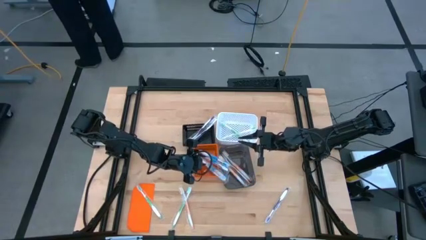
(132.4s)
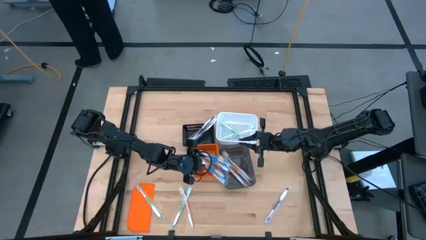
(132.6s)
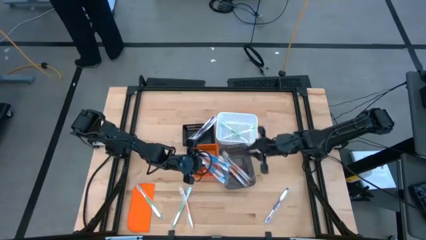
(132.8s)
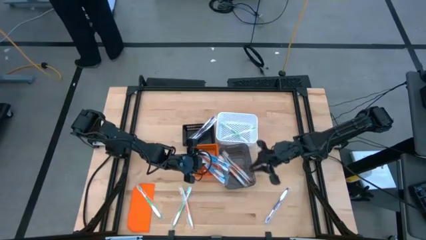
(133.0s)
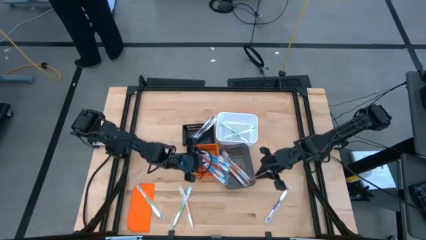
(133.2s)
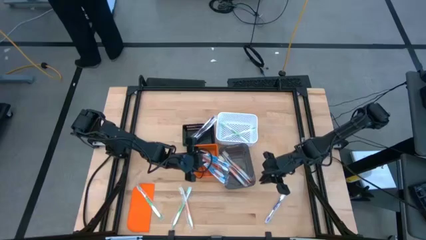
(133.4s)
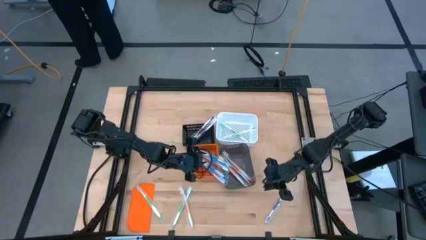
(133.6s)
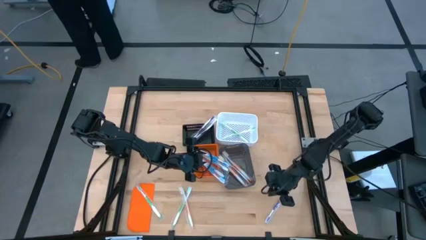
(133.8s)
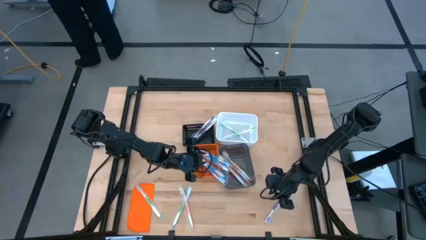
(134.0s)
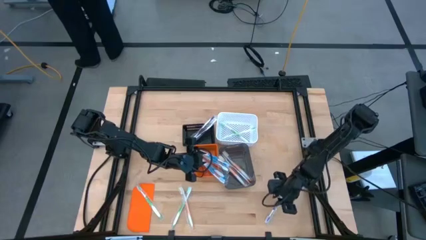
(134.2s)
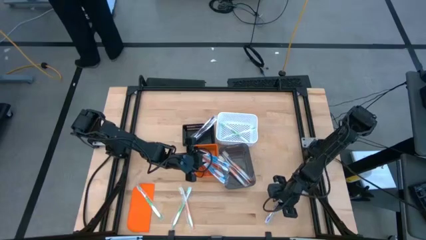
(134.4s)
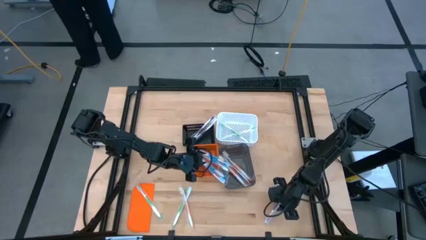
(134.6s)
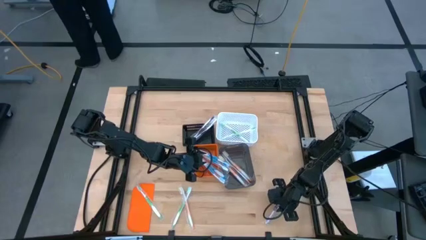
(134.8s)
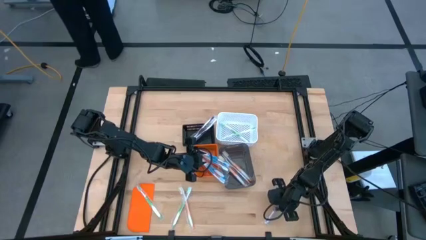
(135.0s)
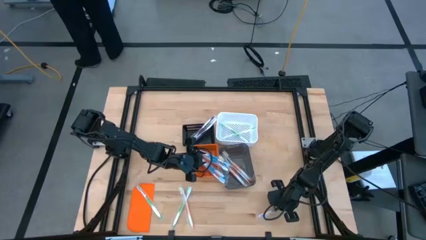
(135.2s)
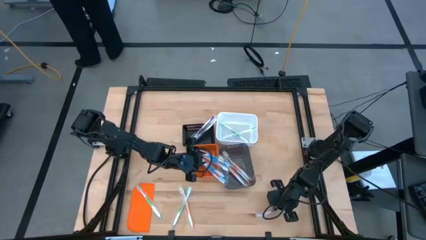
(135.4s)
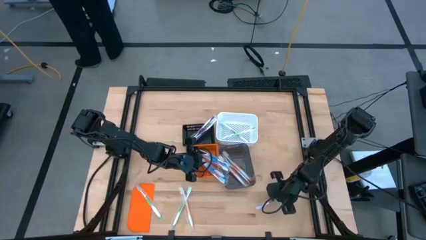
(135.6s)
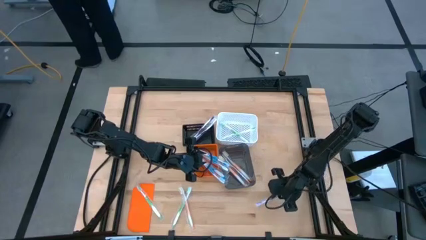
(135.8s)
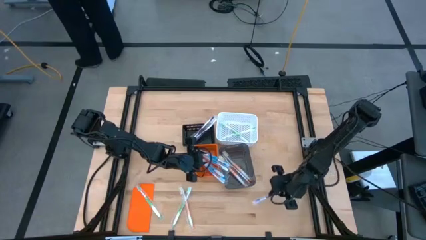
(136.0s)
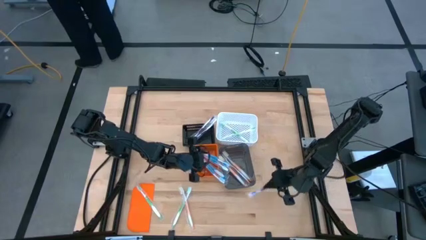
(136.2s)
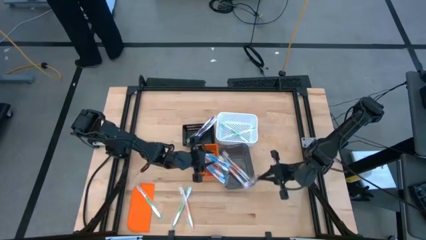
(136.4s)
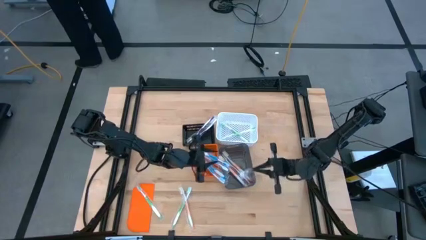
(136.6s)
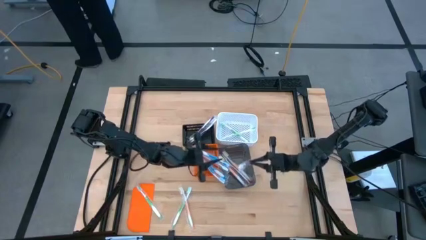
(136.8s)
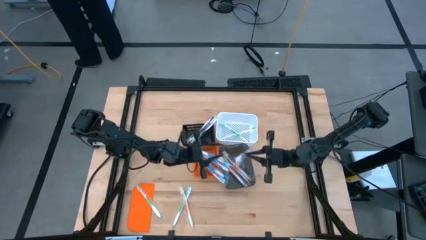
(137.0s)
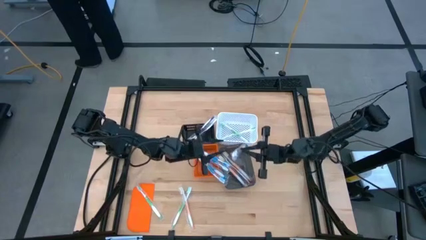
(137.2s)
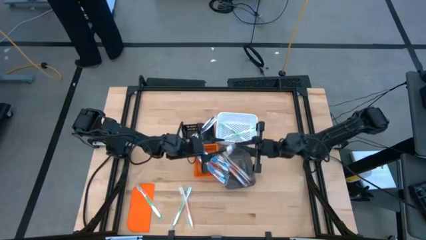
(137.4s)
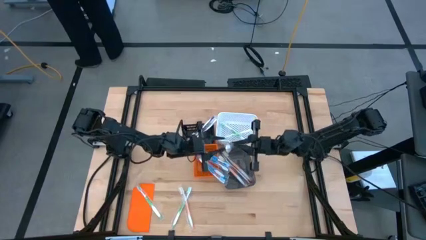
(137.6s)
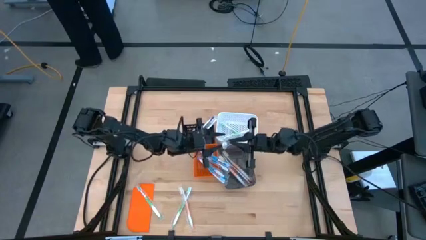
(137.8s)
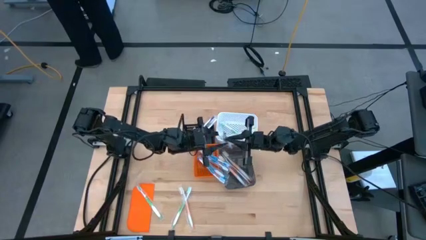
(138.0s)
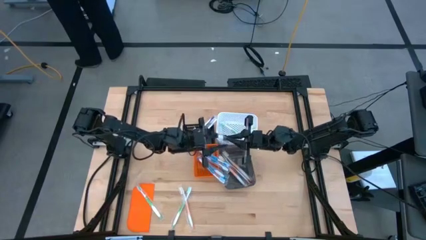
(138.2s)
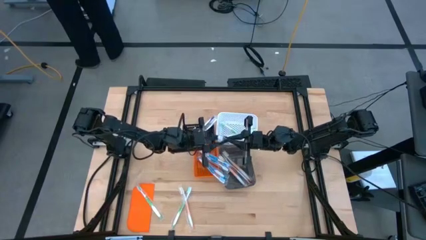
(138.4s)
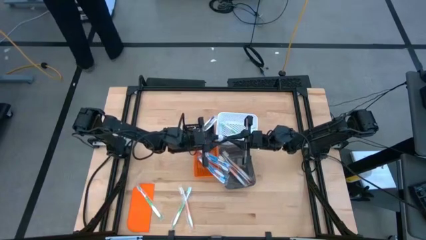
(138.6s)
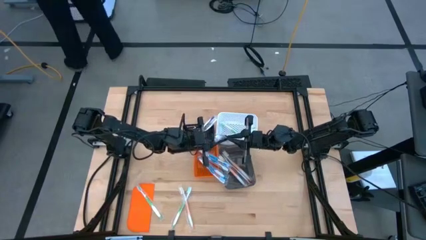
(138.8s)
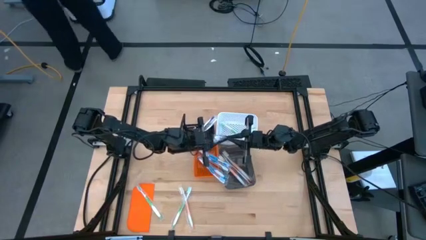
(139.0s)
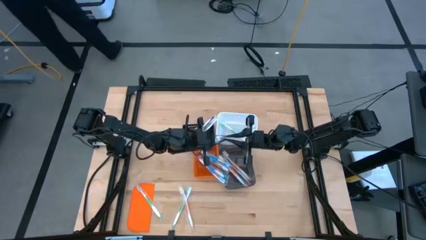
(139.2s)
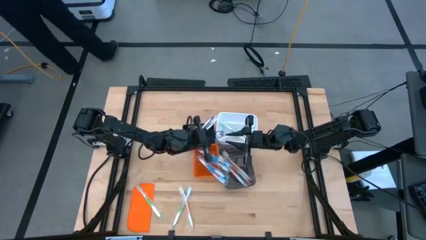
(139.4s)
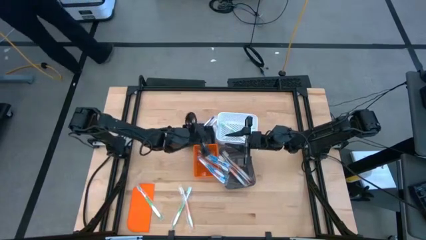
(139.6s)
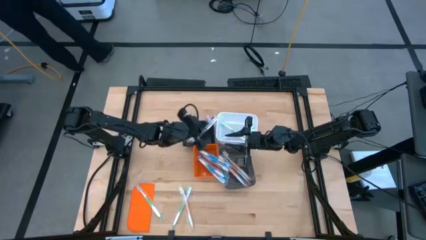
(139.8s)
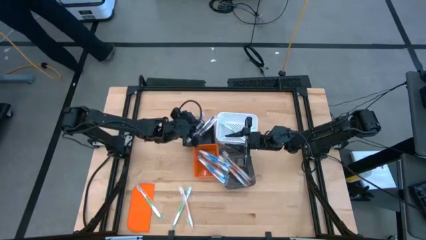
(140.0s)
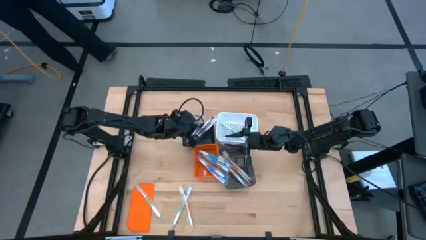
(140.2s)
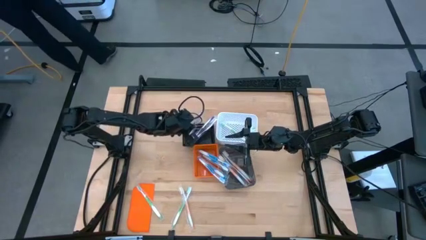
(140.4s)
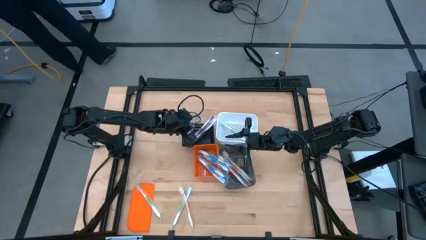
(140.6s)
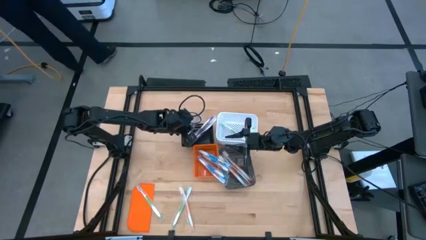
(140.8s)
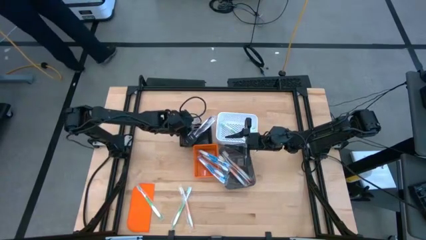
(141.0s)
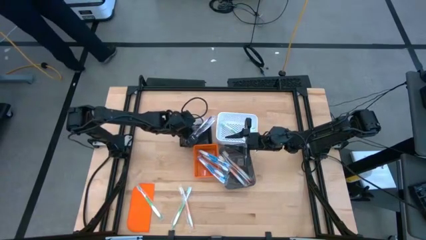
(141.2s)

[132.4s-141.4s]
Task: Pick & Place Toothbrushes
Put the violet toothbrush into the black bin

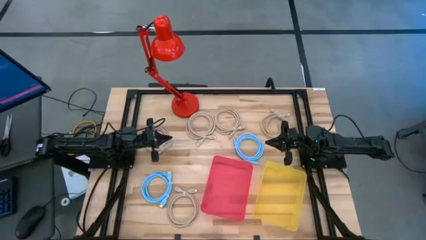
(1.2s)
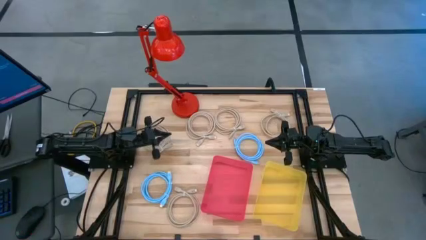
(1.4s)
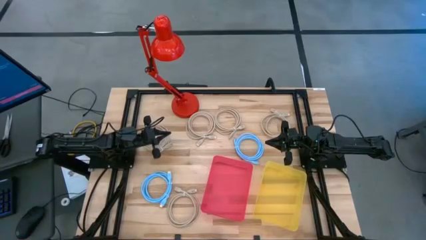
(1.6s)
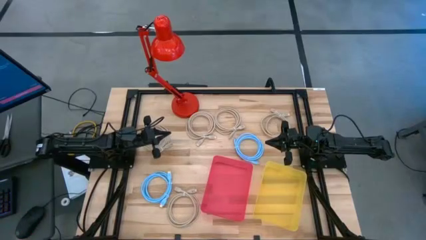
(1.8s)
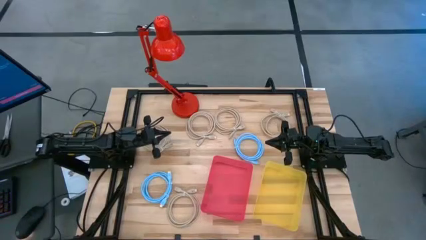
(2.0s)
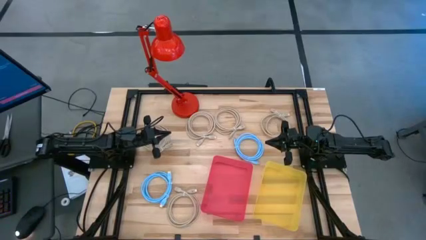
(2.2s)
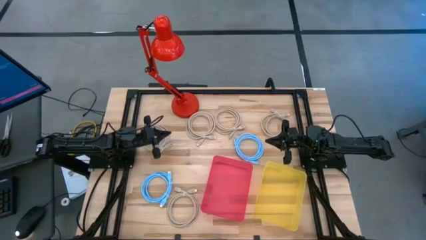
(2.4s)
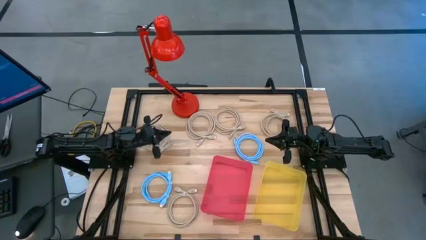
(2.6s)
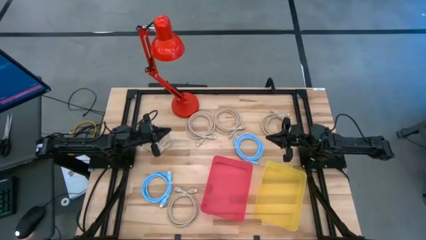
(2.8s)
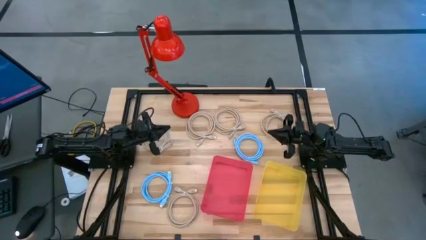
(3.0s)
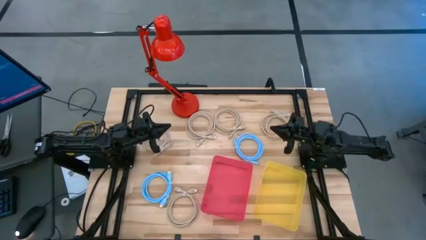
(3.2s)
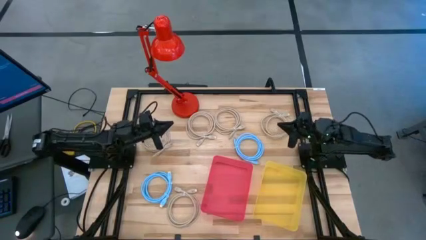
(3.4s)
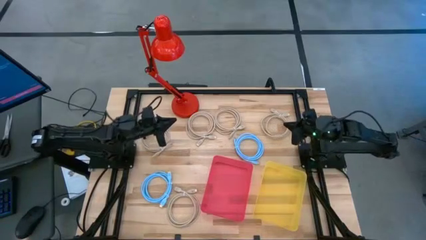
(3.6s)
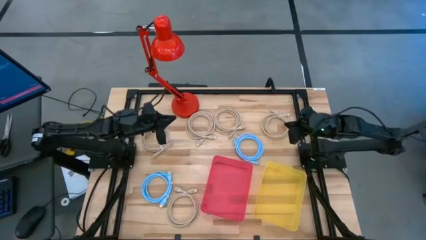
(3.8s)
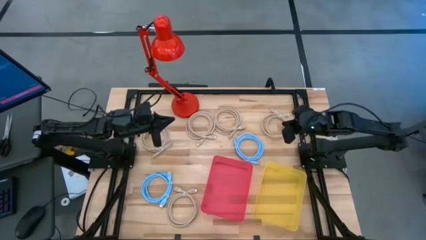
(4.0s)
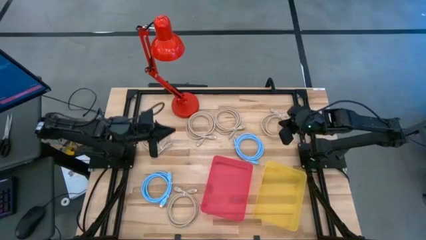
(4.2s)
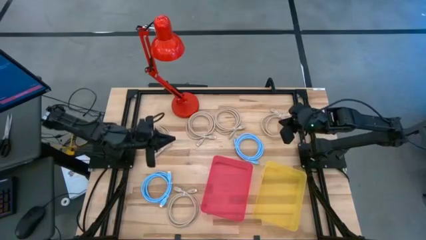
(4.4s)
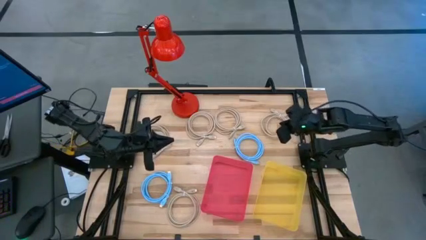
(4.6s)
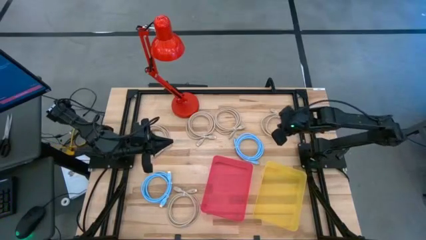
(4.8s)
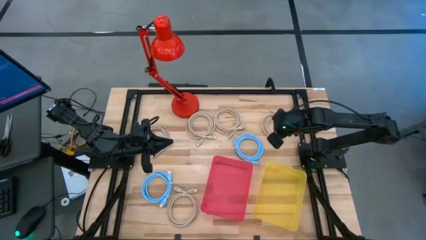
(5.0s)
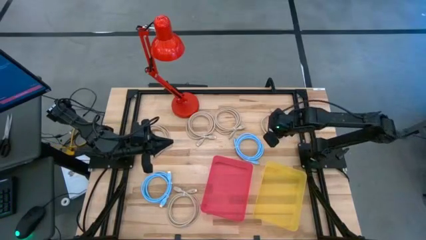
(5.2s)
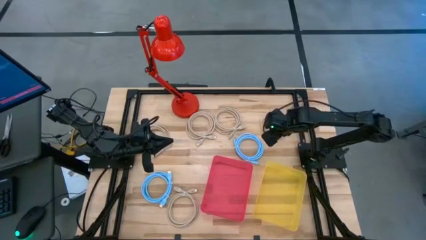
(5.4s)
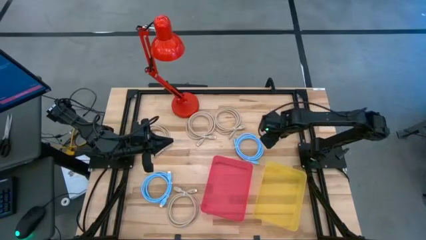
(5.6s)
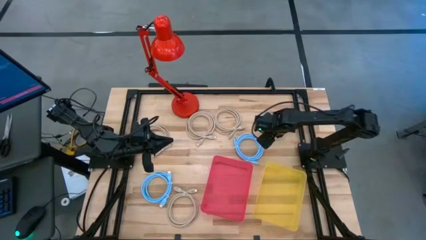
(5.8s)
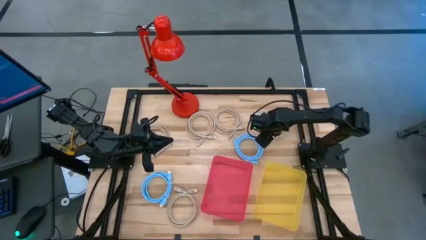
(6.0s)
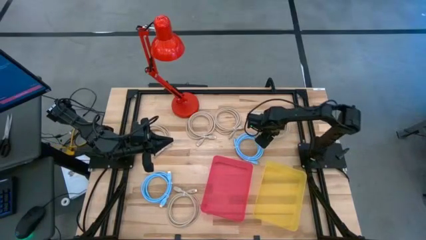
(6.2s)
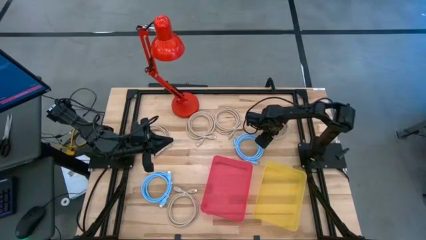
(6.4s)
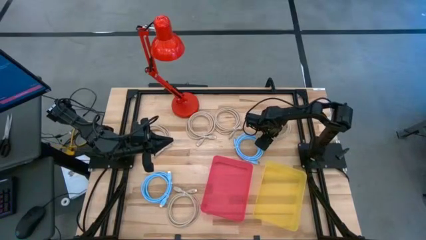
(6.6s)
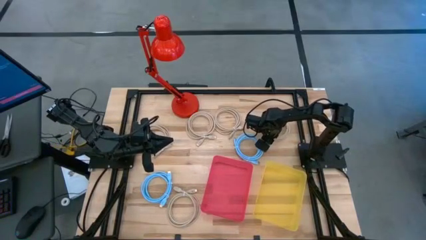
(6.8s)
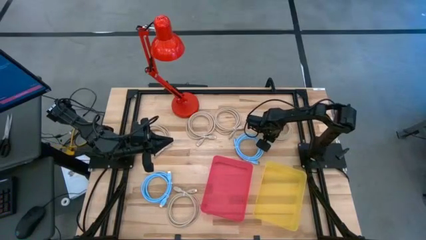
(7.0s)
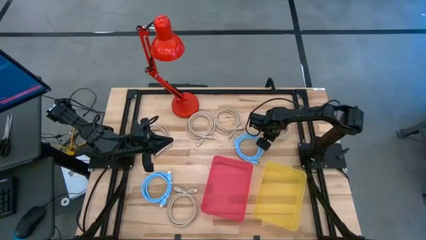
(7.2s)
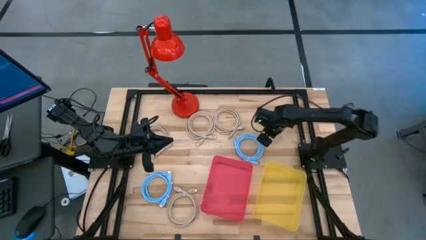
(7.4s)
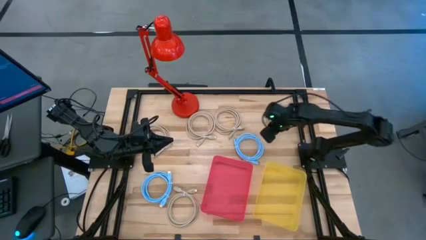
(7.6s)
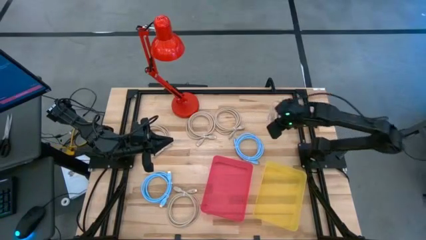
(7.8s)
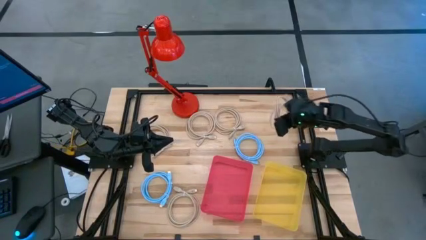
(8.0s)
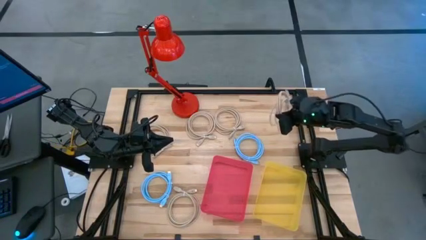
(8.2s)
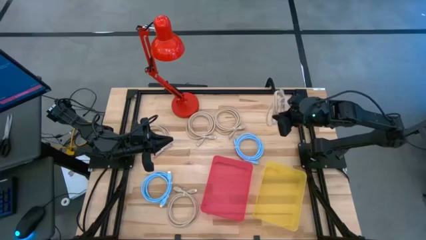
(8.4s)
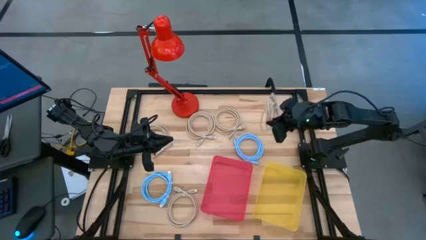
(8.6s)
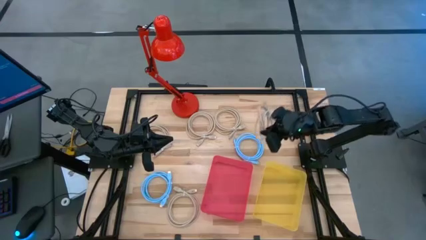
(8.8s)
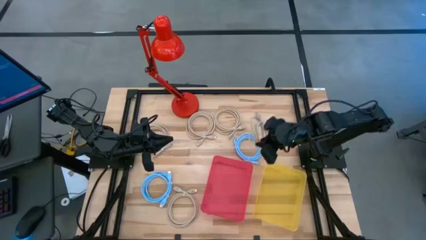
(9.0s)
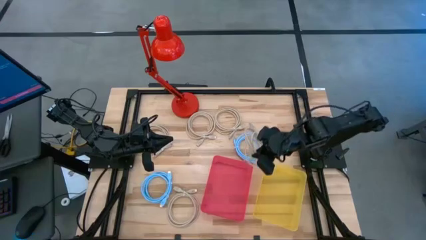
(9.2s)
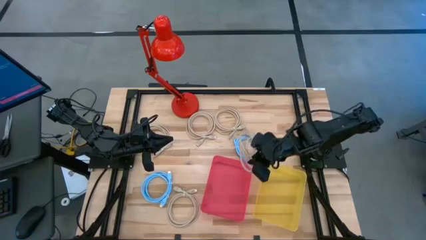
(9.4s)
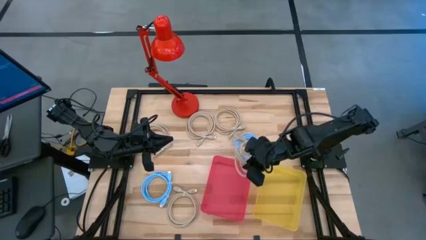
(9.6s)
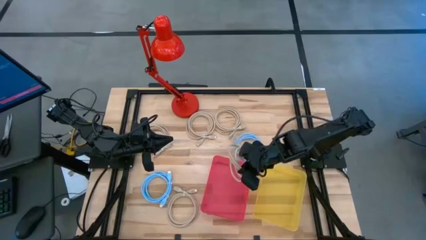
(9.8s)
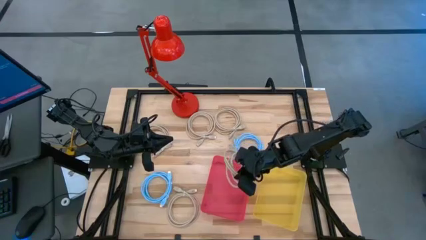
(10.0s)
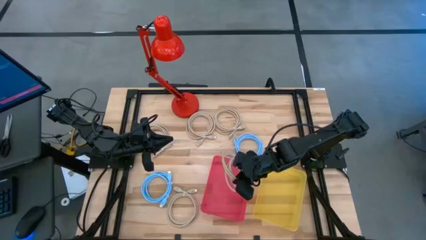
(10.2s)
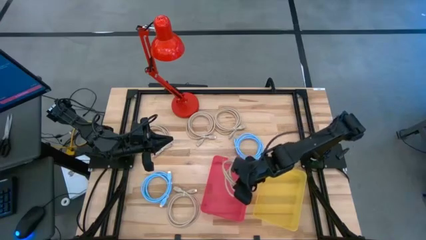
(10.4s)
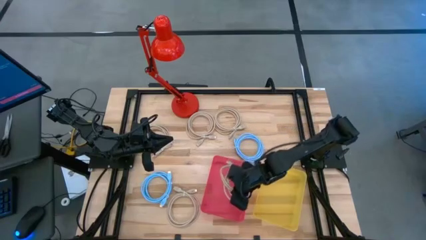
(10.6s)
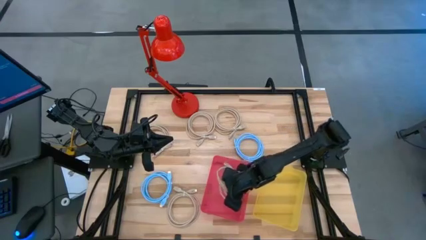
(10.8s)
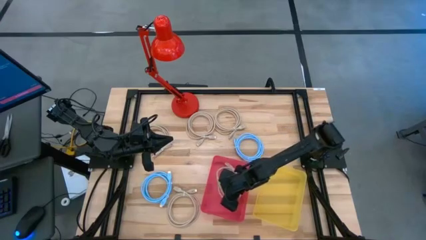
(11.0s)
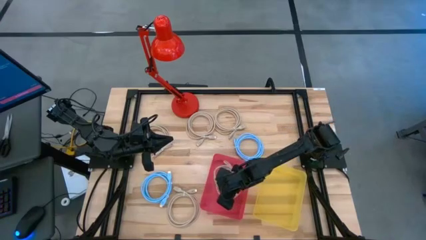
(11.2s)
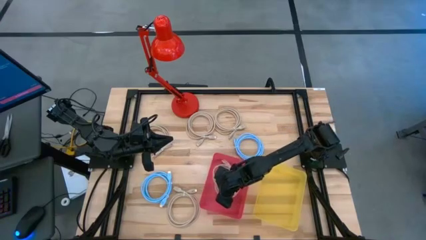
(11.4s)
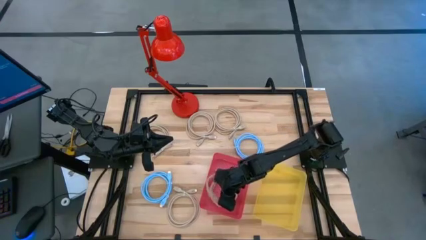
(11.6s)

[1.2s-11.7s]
Task: Sort HDMI cables
Put the brown HDMI cable into the pink bin
